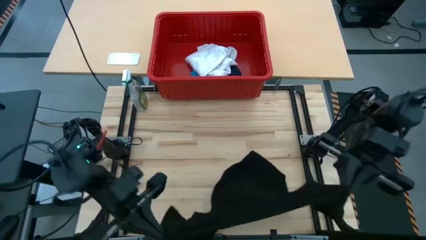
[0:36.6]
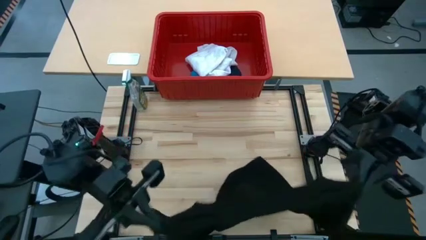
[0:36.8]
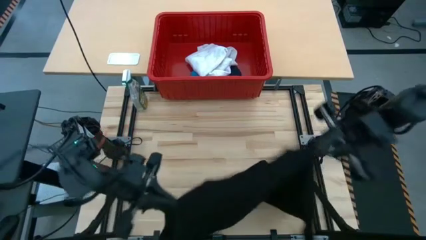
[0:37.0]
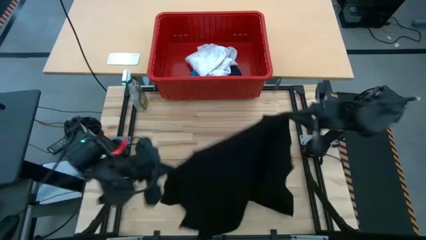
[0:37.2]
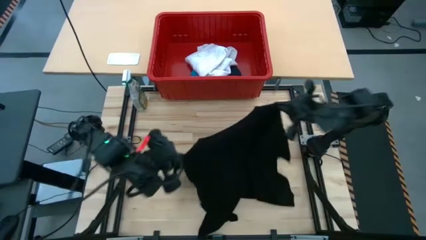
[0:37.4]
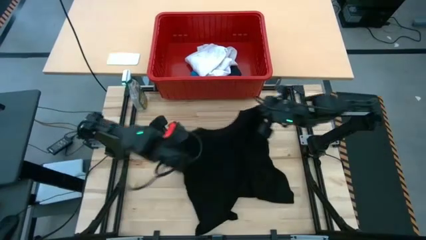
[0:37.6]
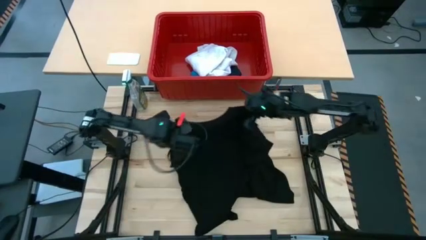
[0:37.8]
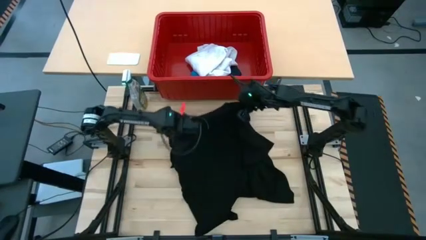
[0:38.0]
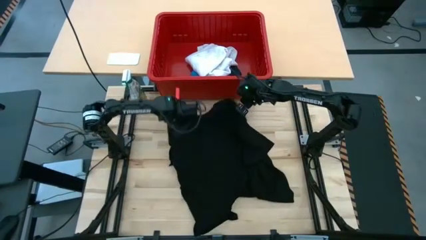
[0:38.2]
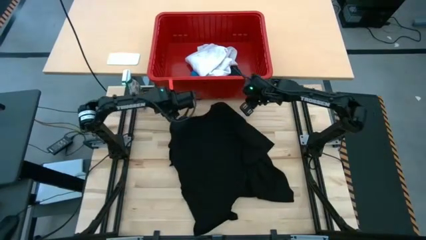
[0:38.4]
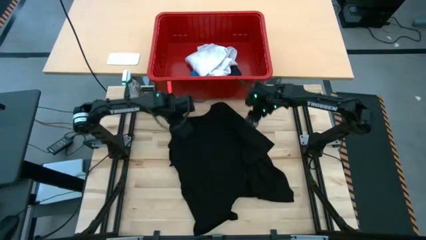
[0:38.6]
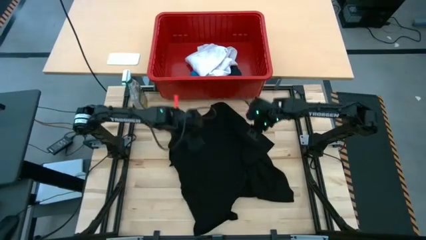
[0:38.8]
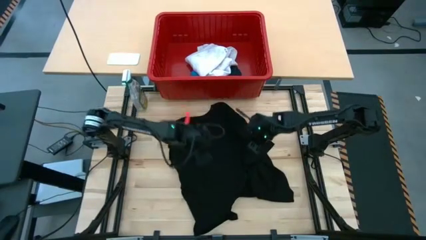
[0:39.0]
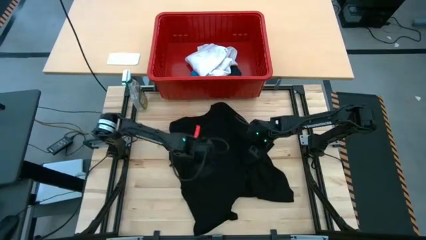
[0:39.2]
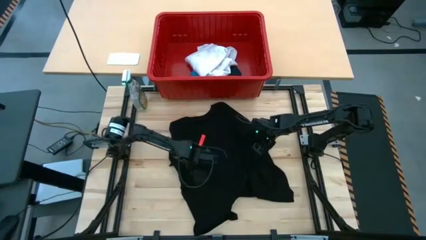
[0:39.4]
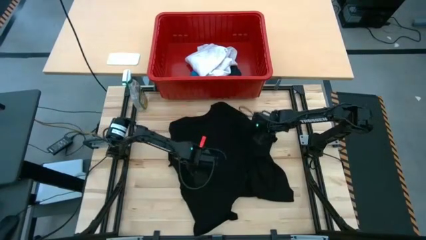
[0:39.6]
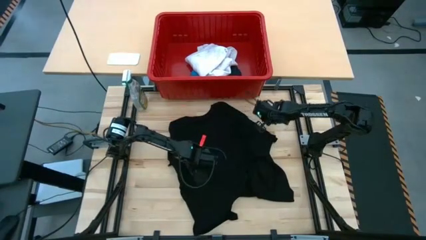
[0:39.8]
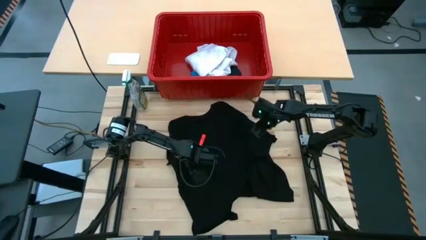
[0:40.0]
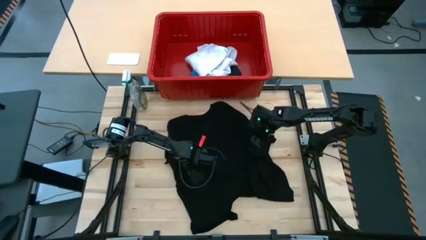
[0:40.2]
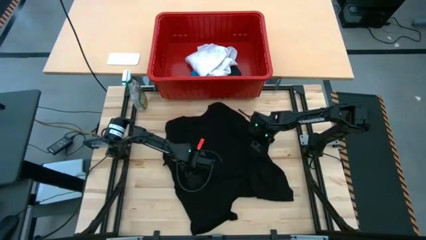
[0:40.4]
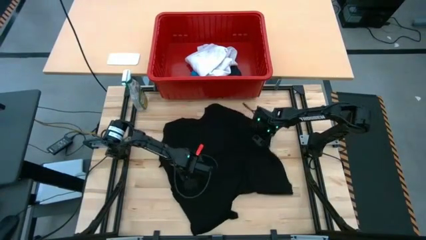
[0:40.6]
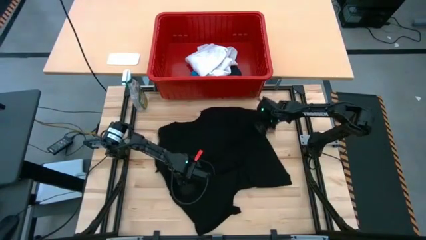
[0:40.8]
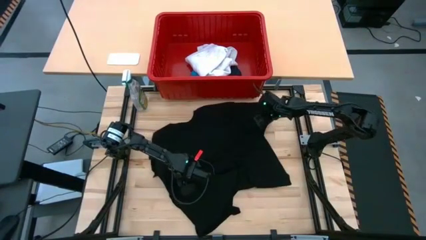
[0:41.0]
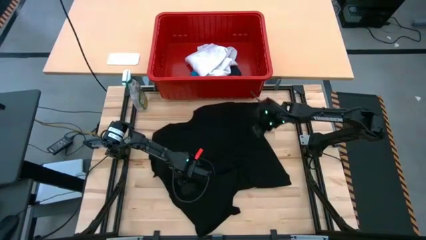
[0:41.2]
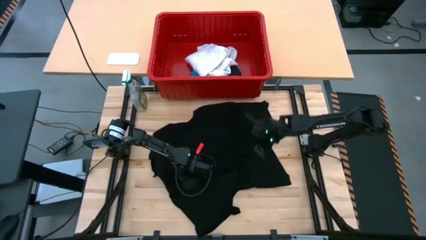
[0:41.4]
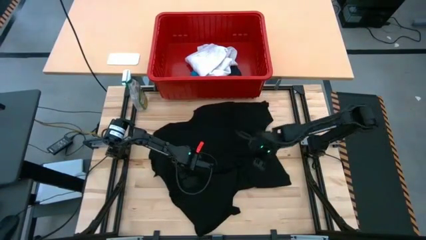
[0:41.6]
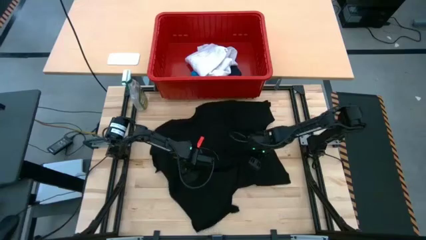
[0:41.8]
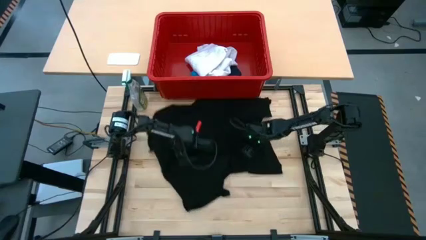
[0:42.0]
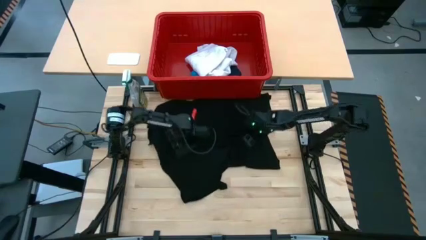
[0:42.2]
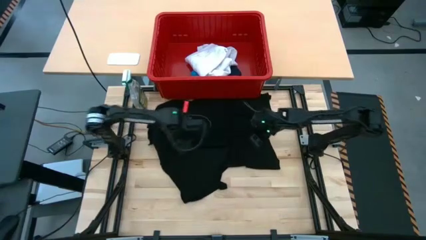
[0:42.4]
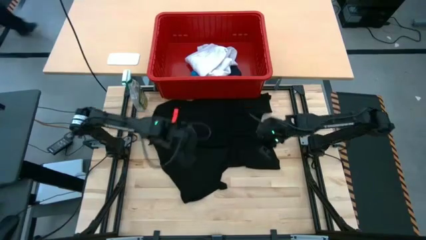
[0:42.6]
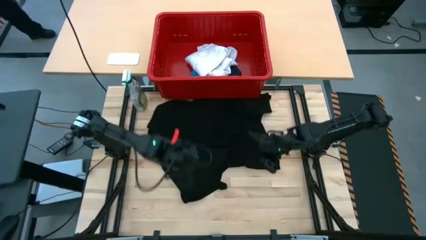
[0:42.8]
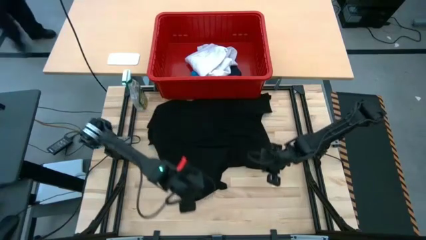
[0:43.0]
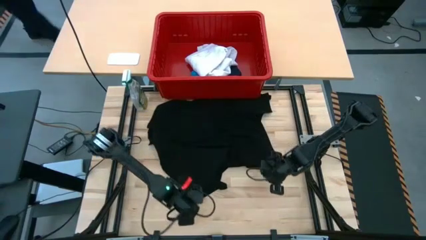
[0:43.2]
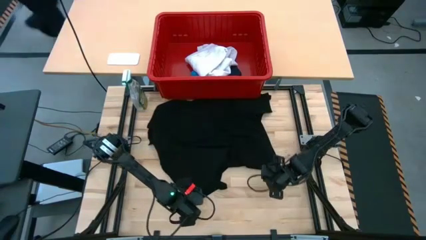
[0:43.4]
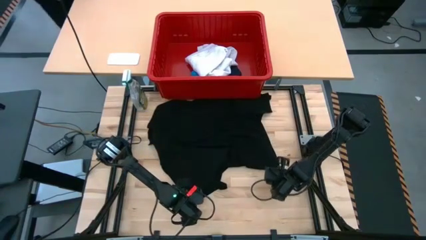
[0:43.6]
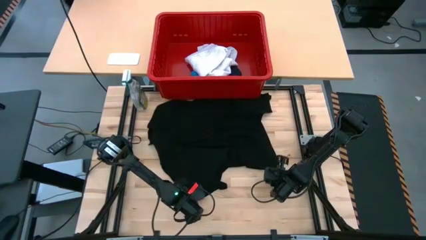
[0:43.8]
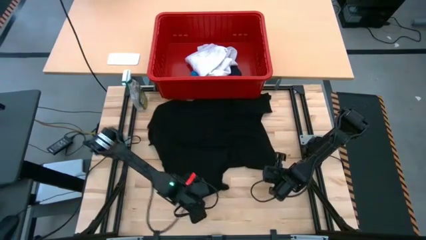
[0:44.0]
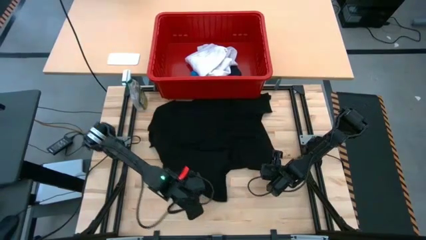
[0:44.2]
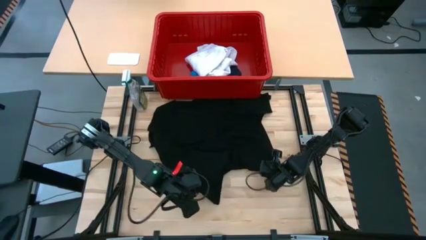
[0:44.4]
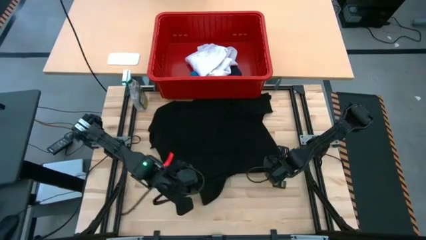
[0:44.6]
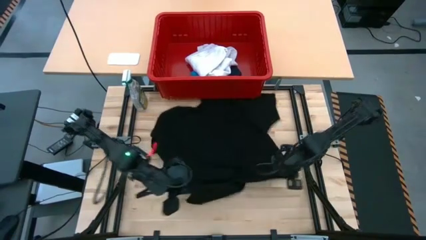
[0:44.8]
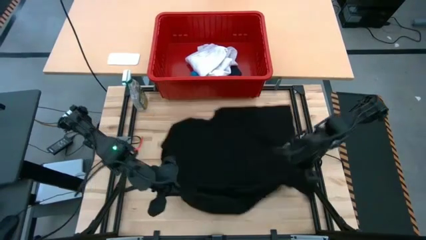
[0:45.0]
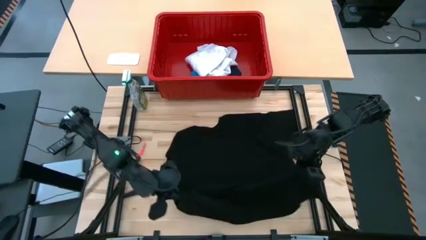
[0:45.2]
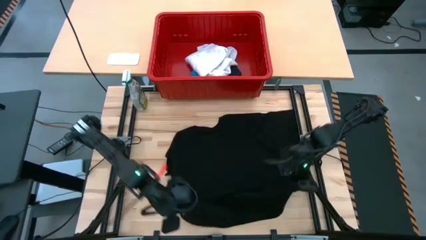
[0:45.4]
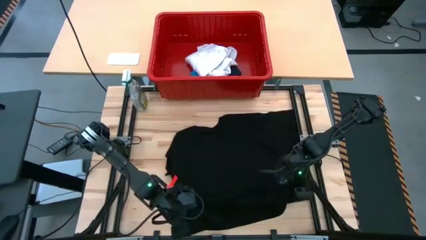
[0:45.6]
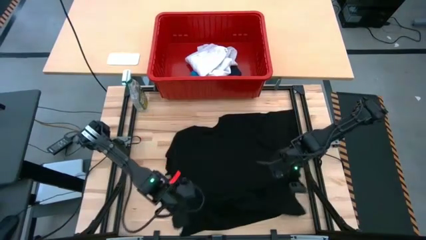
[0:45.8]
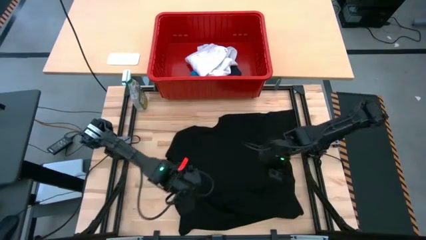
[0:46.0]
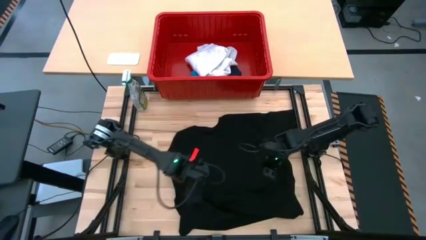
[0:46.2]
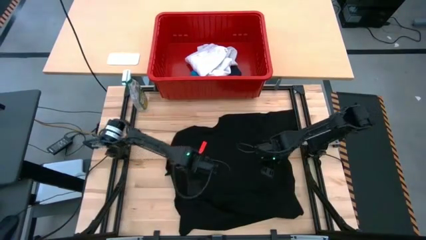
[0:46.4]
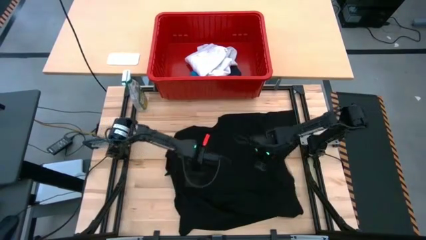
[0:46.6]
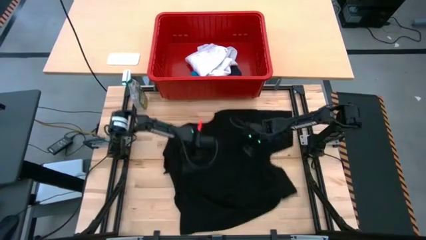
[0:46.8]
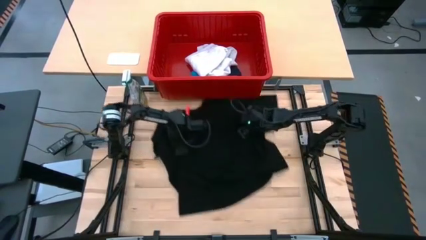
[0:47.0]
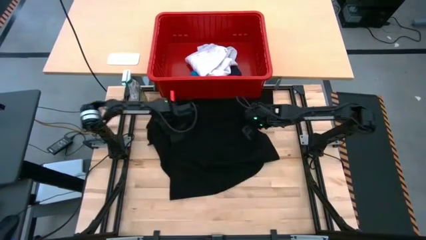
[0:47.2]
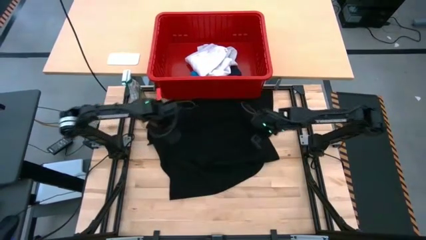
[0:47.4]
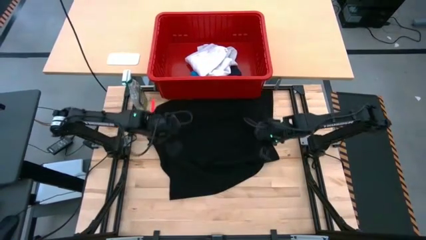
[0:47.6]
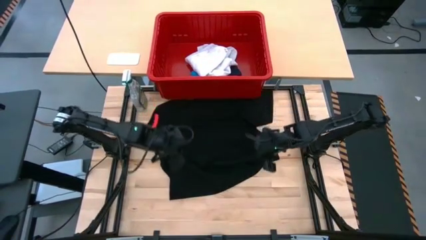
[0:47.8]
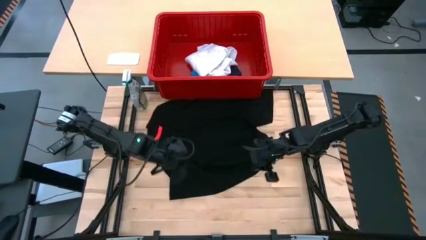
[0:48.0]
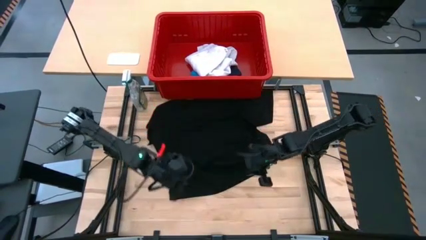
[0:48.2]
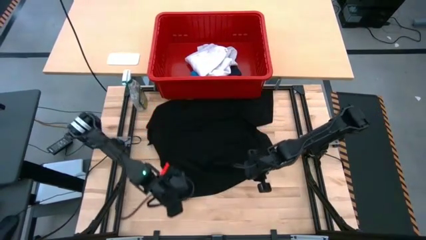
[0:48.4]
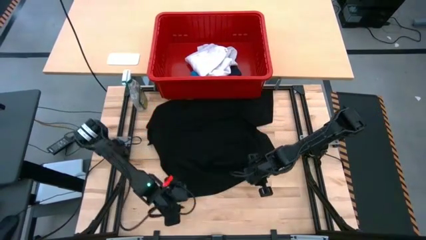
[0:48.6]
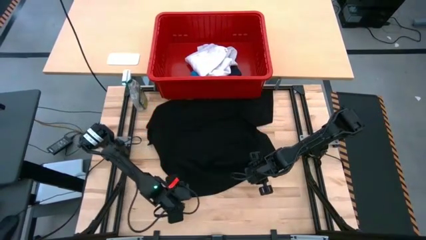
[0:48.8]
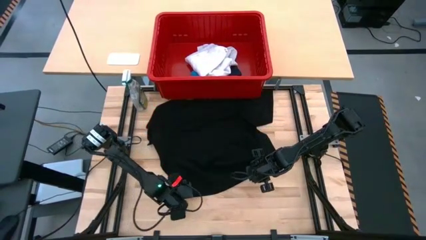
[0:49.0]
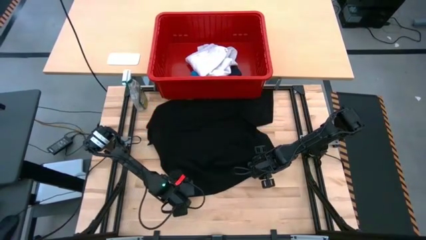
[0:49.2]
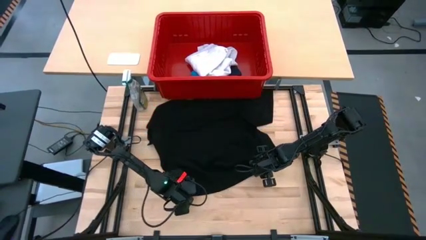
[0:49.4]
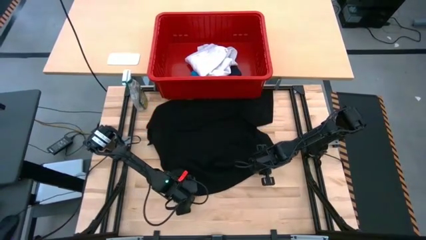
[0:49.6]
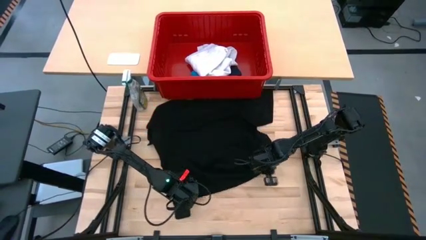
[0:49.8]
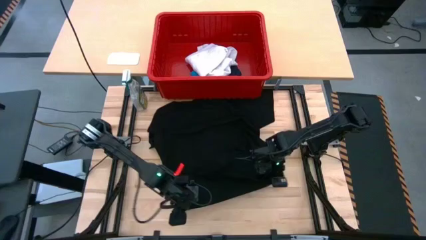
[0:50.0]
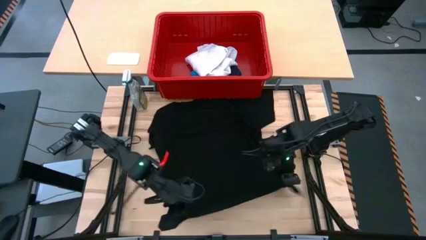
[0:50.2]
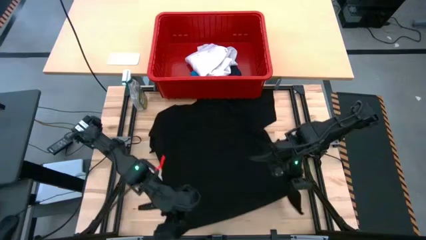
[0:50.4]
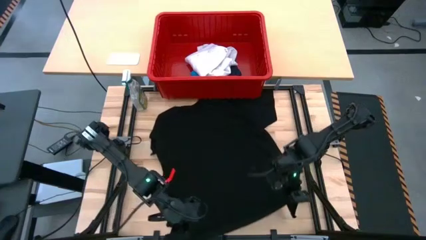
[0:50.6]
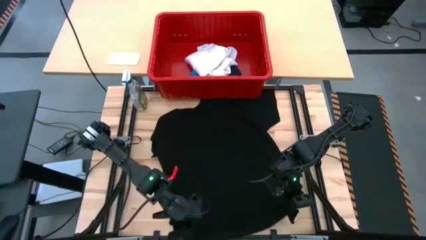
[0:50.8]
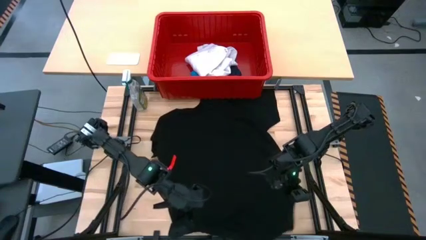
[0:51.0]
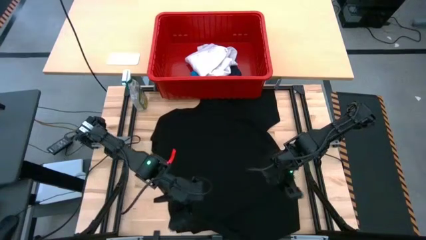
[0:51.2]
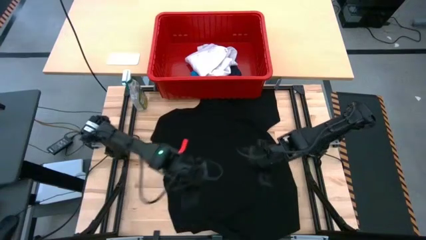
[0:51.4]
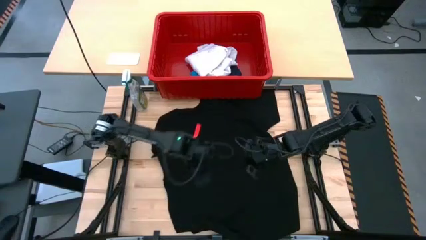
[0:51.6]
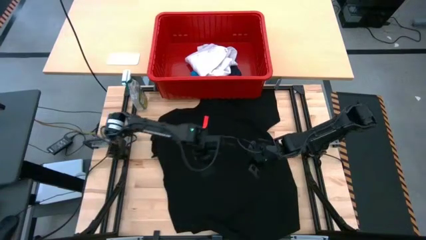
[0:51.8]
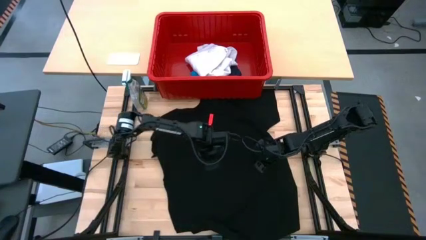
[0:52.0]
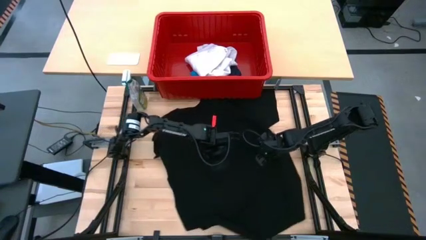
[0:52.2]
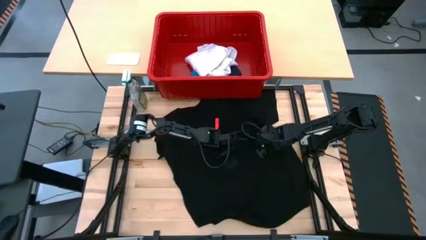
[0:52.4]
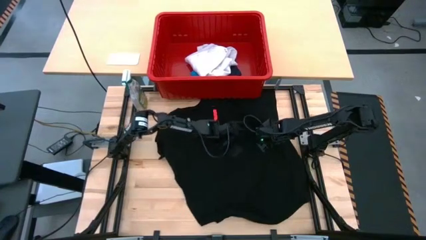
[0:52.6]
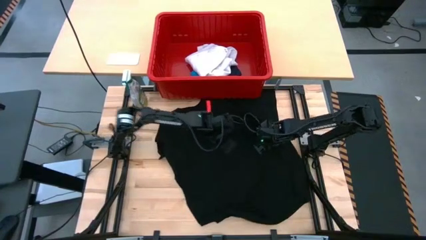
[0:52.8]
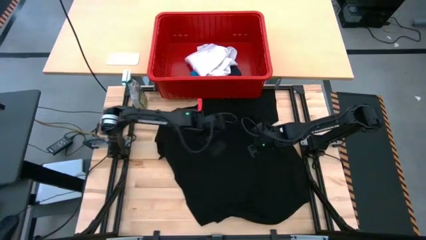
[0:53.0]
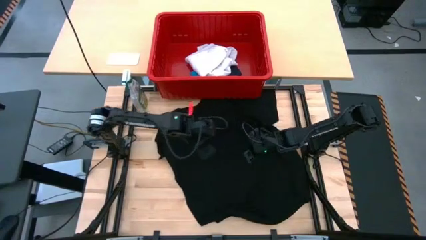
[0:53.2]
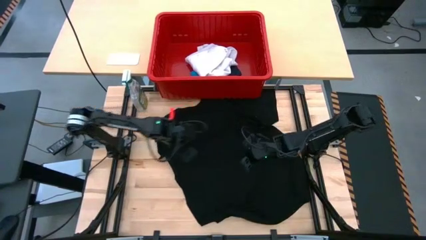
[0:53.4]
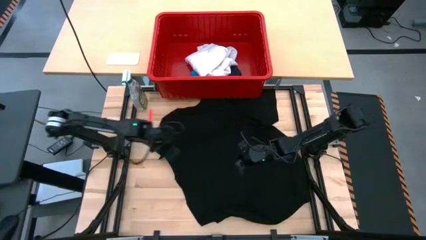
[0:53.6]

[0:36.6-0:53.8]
Task: Fold laundry
Fold the black shirt on the table
